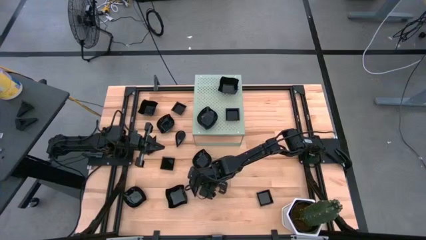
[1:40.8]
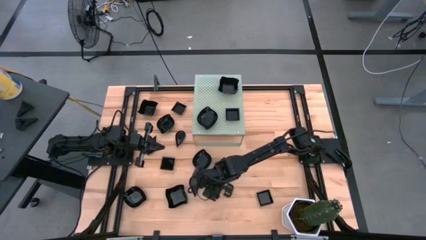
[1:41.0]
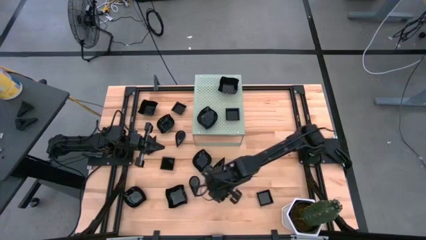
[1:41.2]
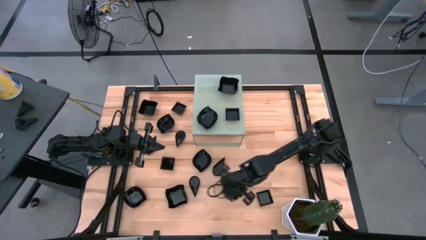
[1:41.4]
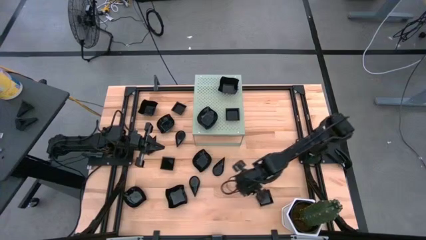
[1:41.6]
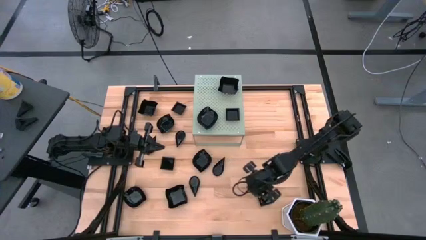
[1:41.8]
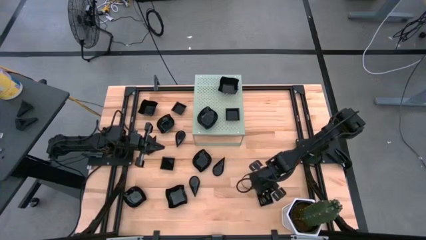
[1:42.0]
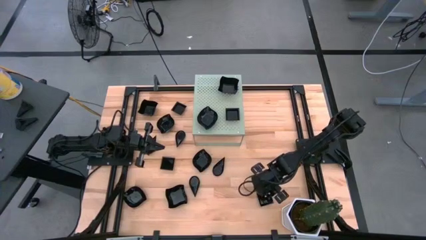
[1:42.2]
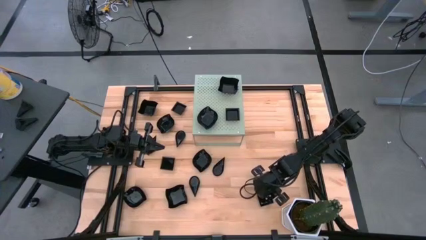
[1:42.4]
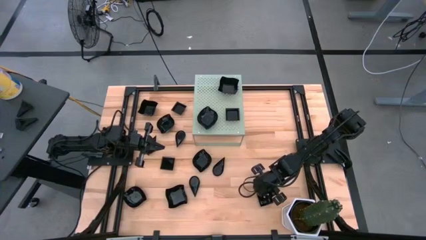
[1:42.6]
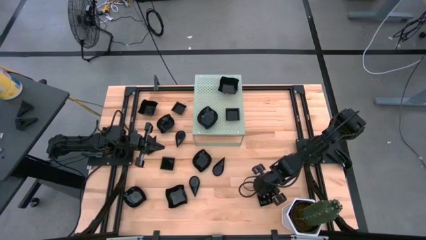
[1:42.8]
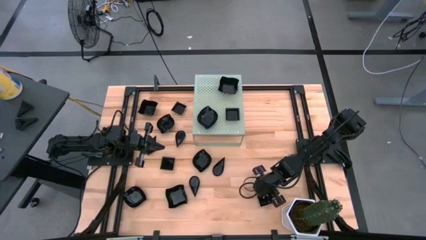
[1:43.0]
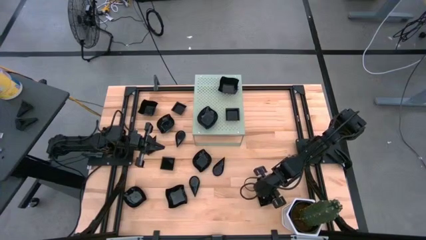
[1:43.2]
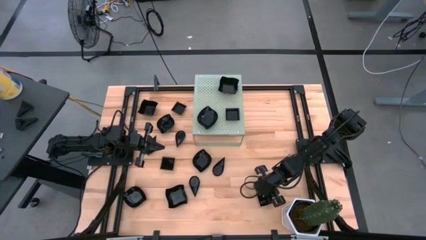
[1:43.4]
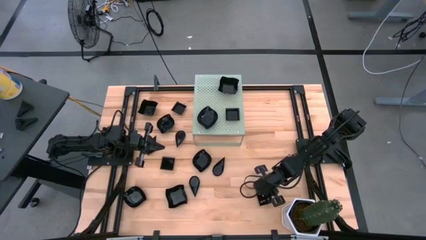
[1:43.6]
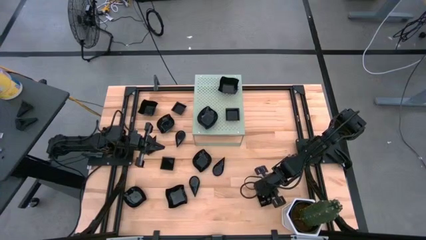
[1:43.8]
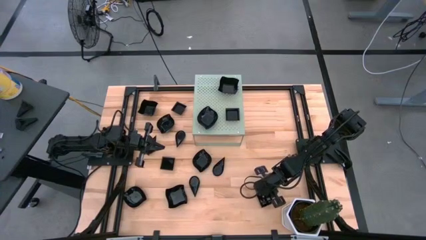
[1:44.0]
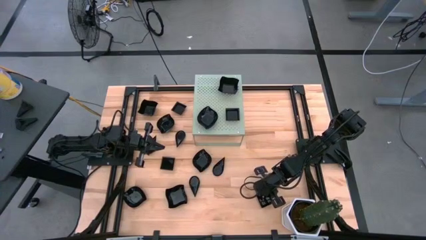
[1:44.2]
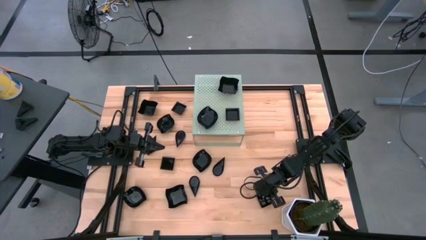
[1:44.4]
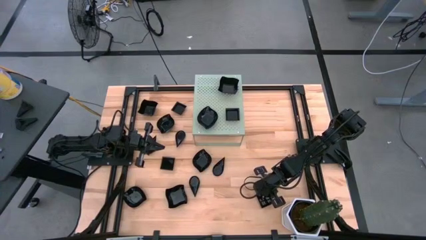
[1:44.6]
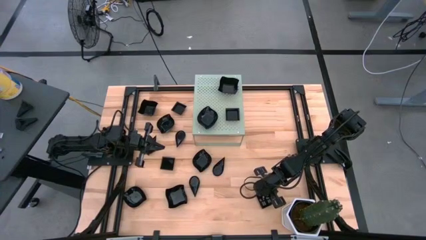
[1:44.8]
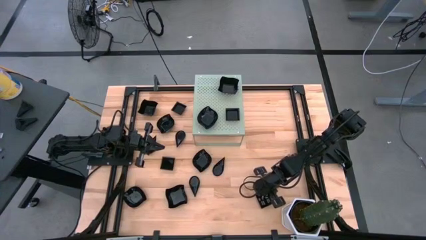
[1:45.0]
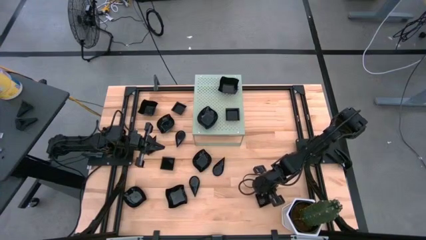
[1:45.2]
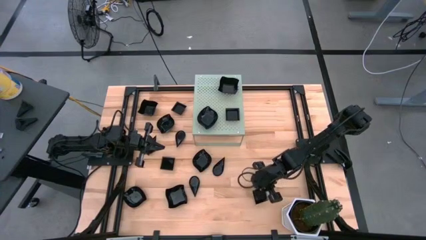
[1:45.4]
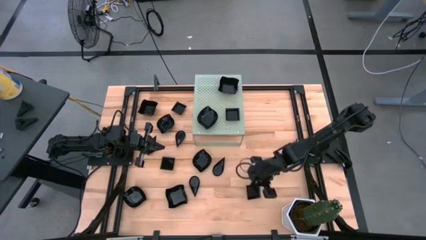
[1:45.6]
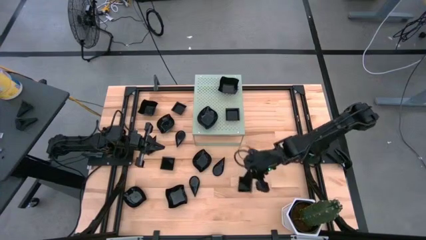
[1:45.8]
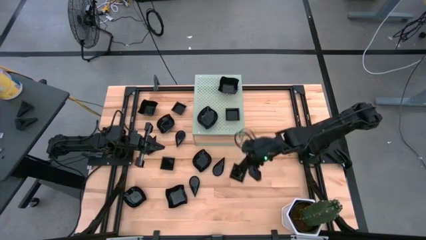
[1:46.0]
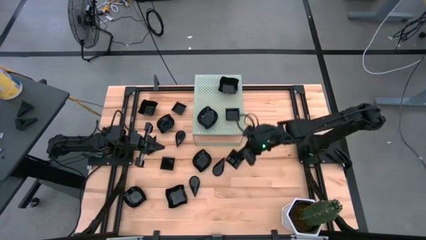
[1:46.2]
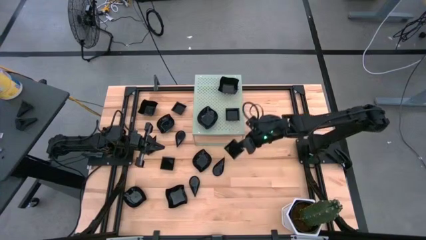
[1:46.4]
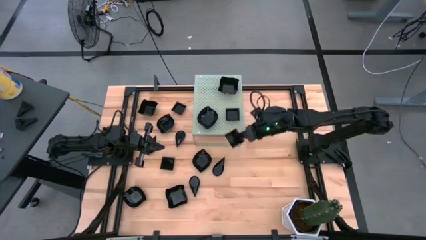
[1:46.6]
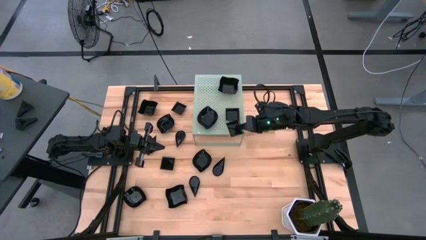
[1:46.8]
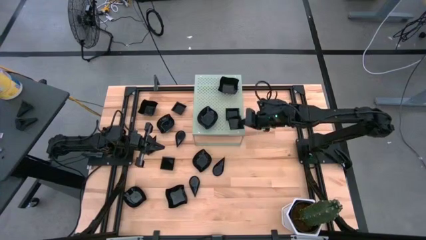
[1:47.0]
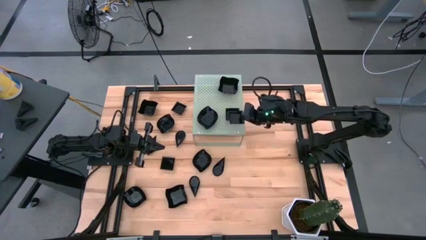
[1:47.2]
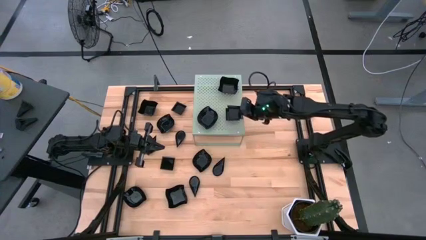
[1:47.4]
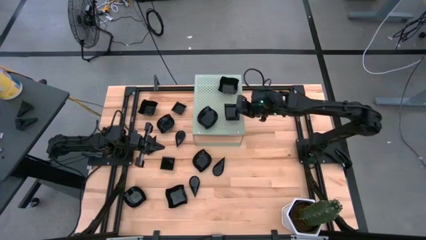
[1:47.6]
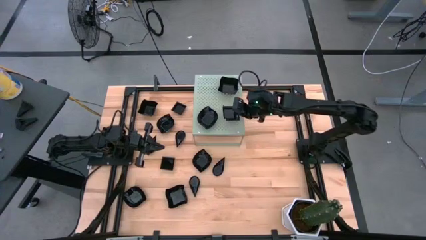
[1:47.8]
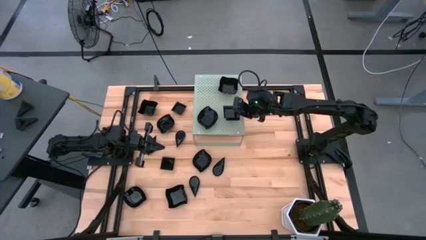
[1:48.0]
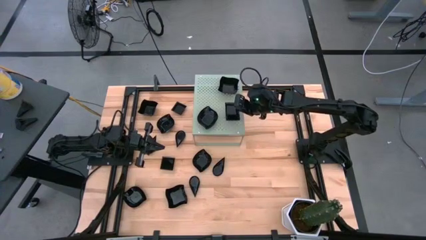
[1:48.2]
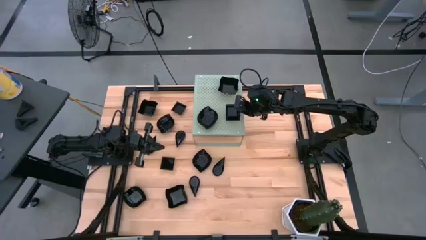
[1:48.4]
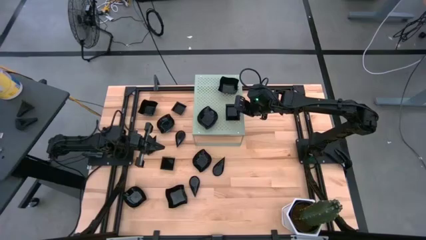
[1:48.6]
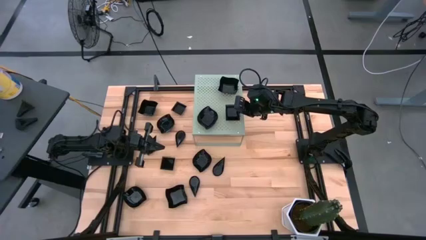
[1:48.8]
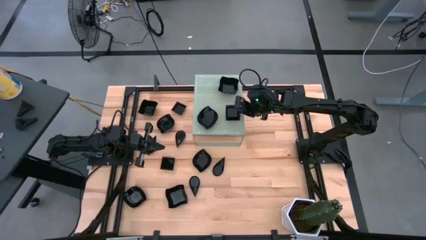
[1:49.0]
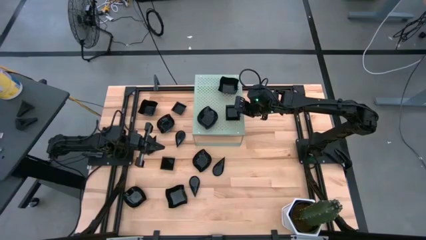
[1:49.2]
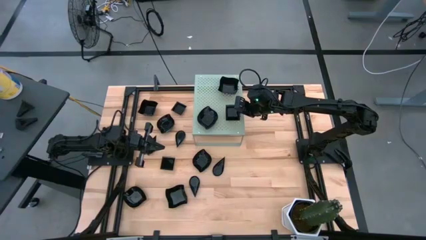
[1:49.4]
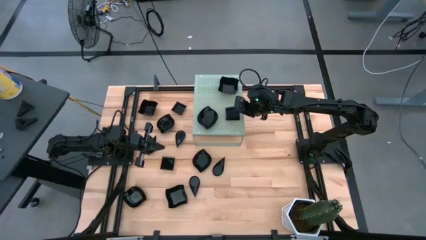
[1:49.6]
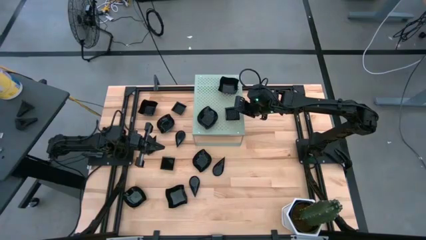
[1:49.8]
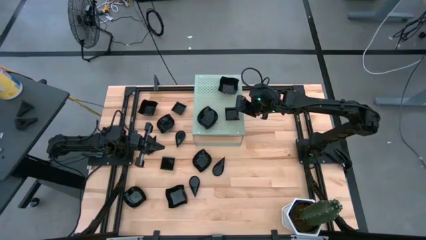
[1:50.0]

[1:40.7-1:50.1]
Task: Pick & Place Mini shaped plates
Stack the square plate on top of the square plate on the shelf

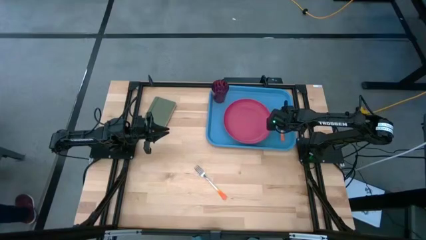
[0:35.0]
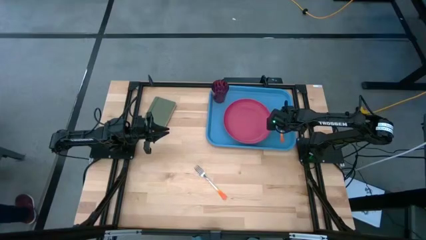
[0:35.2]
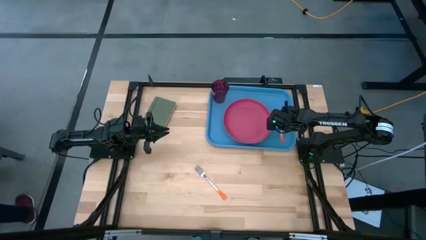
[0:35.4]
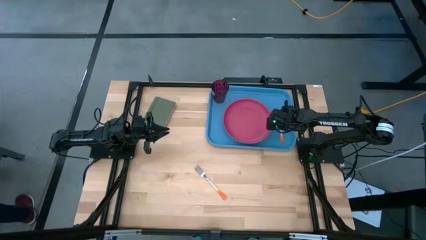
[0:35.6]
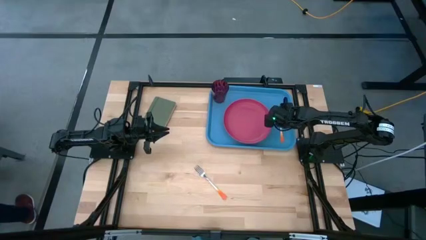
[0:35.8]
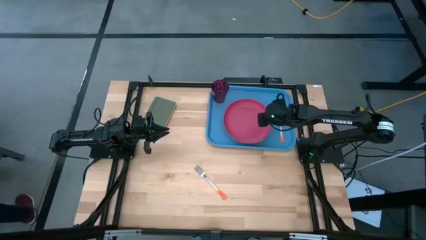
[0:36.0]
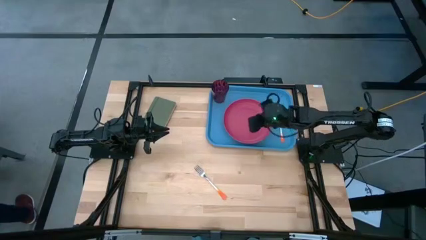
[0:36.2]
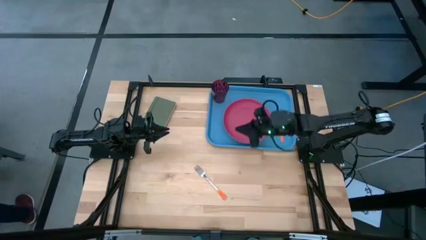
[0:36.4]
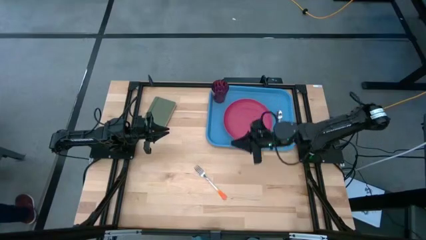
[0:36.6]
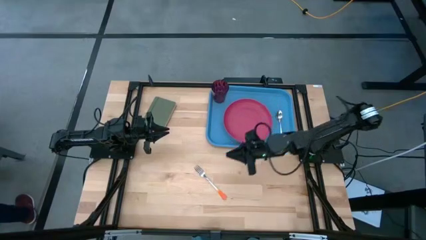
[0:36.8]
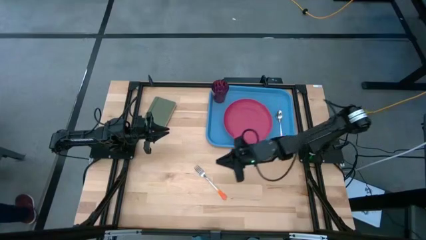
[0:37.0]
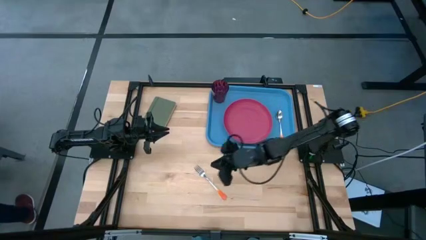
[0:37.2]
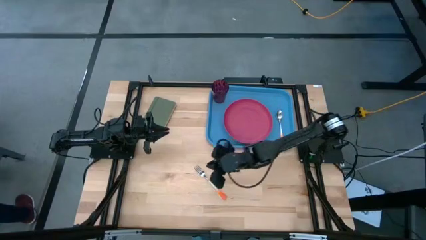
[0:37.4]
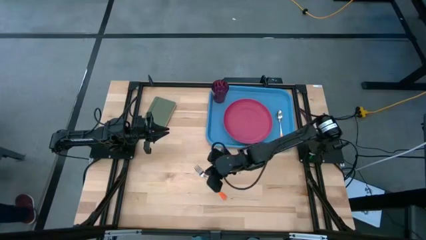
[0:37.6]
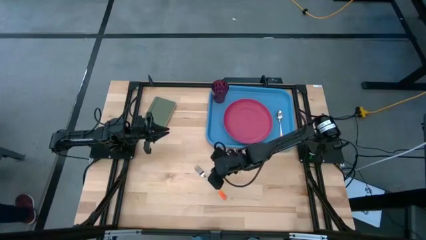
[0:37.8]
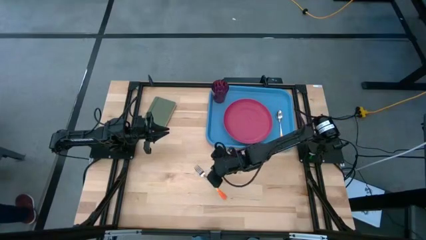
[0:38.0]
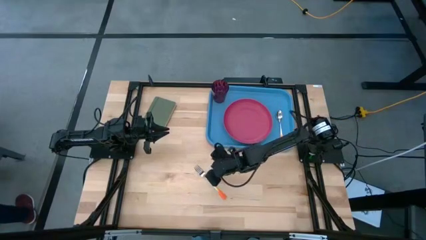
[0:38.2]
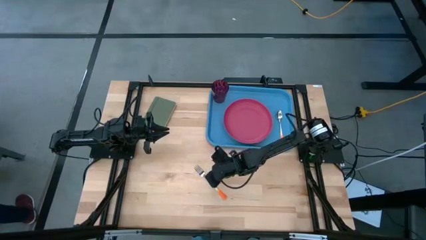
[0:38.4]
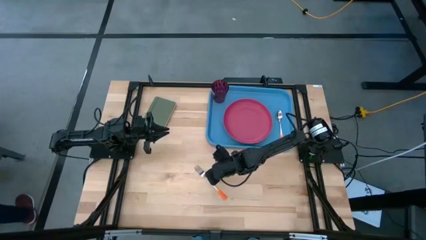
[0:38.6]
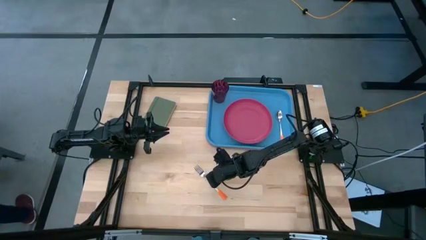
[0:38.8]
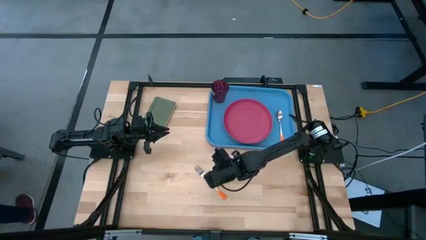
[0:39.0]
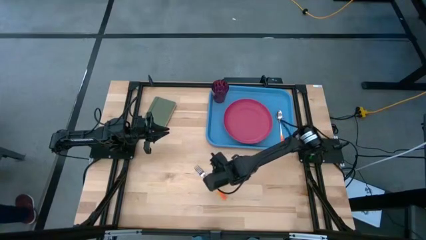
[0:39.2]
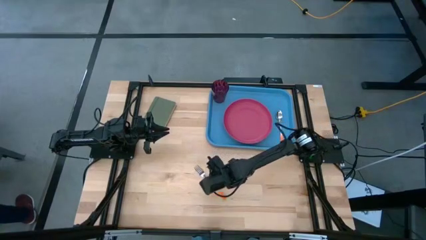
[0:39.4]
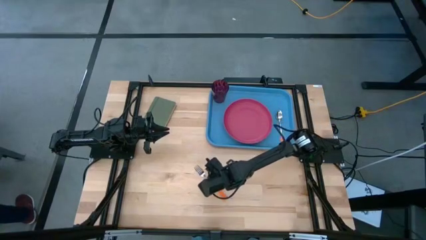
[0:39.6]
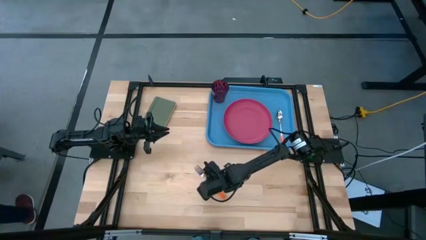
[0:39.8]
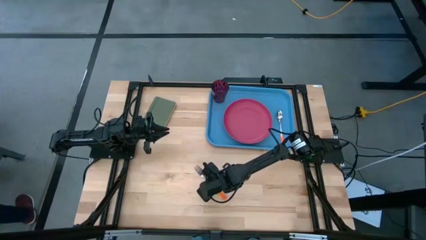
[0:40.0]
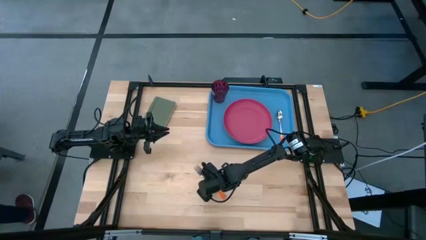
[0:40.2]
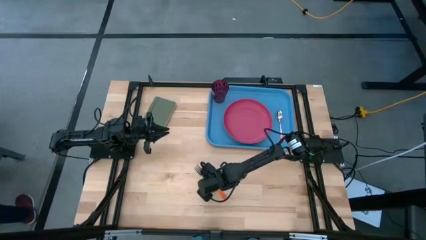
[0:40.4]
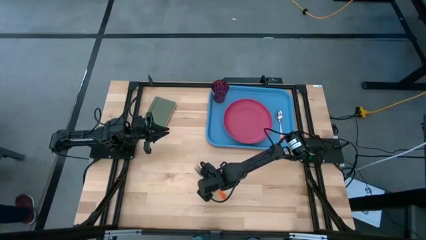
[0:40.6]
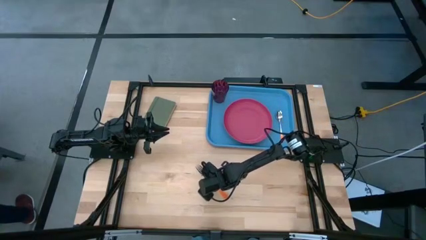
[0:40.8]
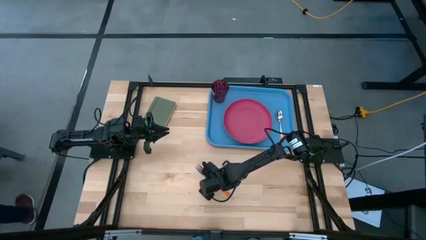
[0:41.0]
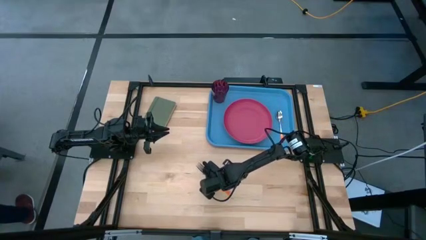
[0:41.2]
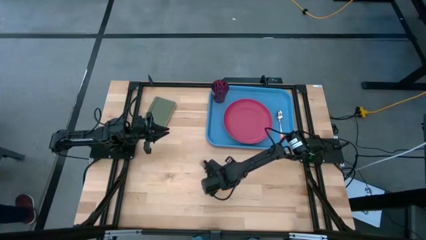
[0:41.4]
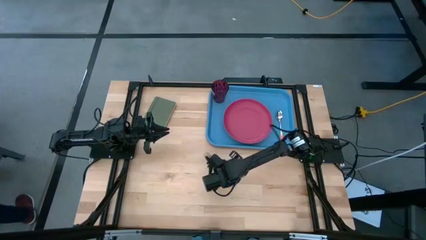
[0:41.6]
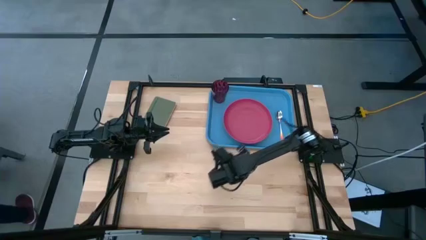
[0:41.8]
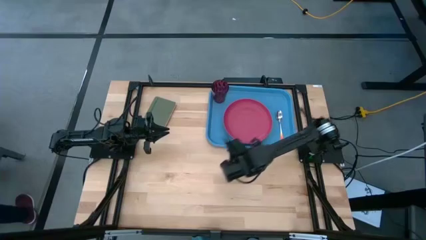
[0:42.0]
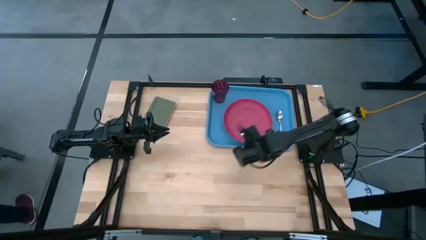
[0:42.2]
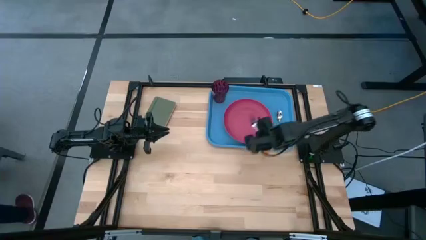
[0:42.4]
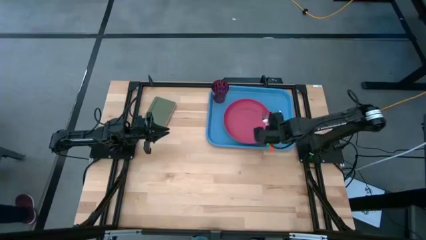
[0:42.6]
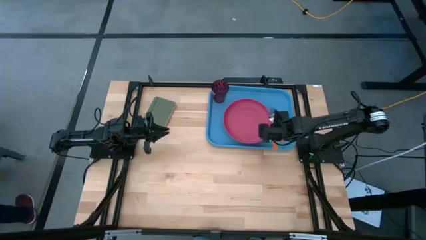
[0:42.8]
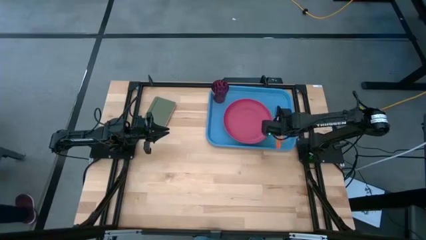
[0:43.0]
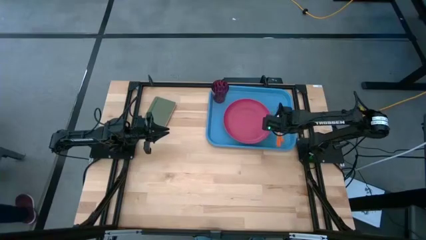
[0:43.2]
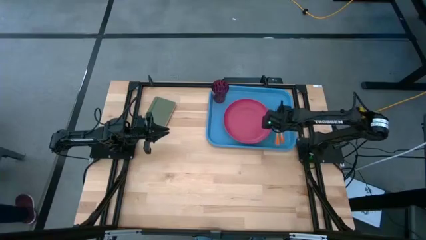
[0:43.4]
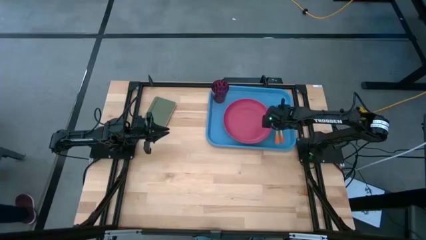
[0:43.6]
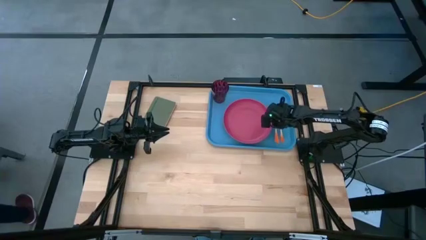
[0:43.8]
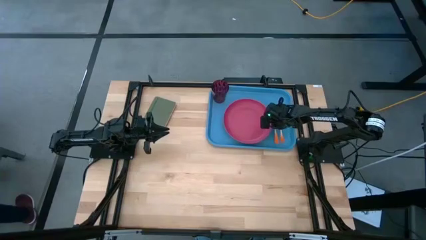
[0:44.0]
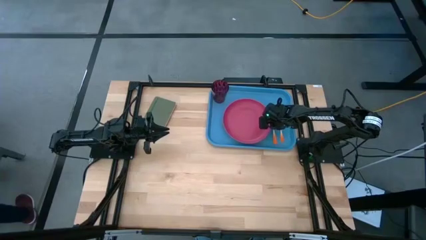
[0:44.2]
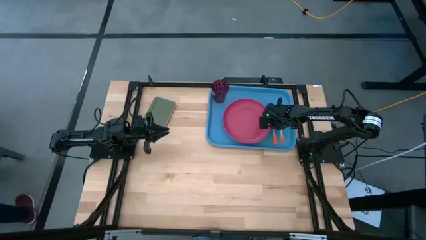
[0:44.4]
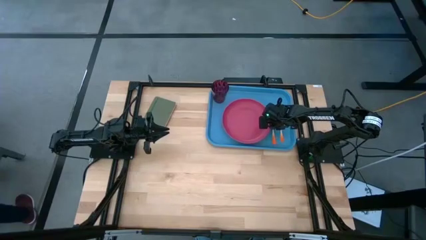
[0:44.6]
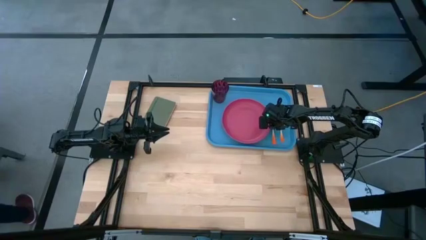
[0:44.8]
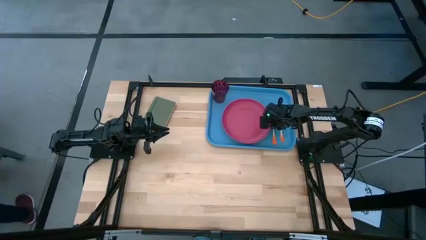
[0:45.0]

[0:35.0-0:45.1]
Task: Pick and place plate/cup/fork/spoon on tray
Put the orange fork on the blue tray to the right of the pink plate
